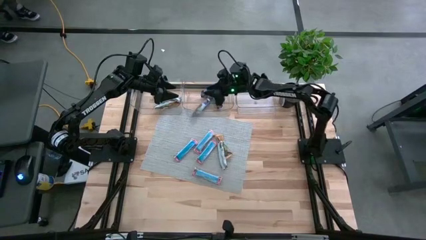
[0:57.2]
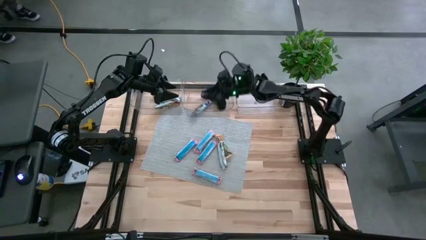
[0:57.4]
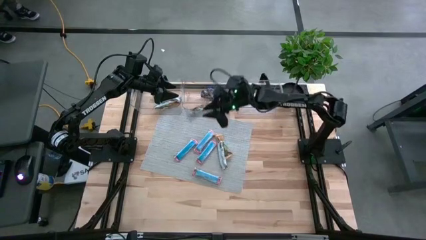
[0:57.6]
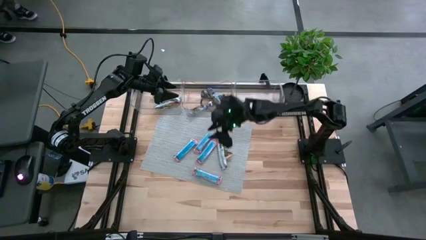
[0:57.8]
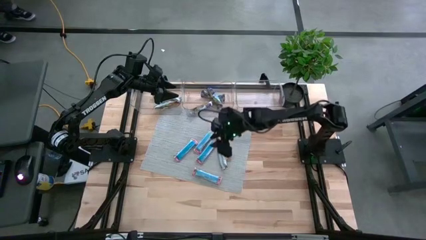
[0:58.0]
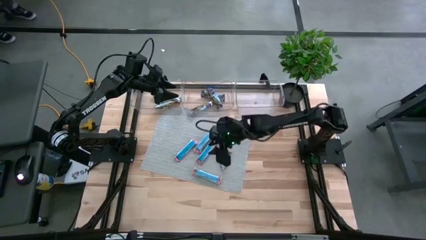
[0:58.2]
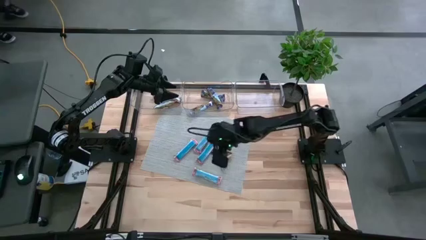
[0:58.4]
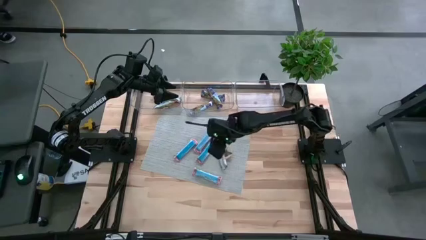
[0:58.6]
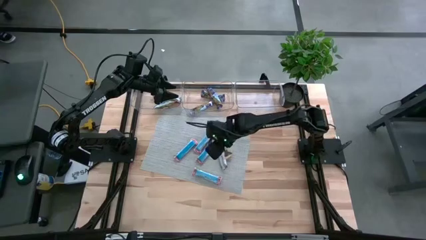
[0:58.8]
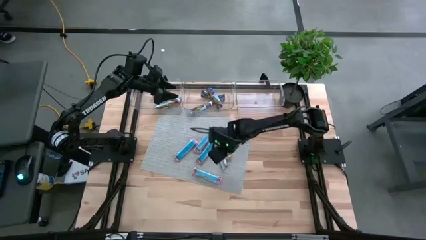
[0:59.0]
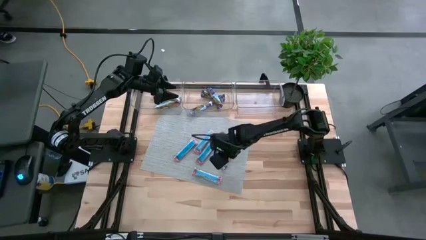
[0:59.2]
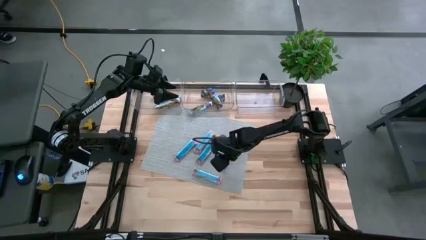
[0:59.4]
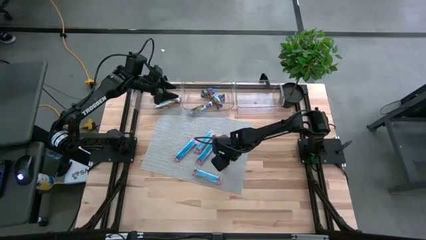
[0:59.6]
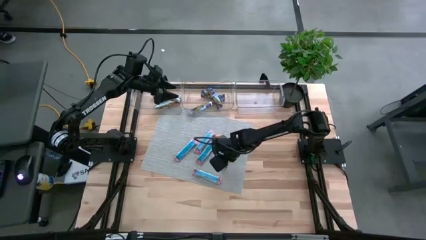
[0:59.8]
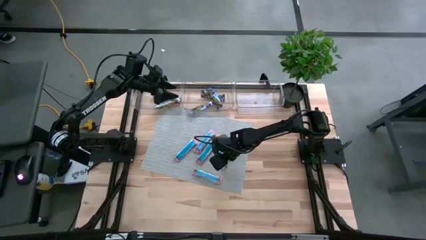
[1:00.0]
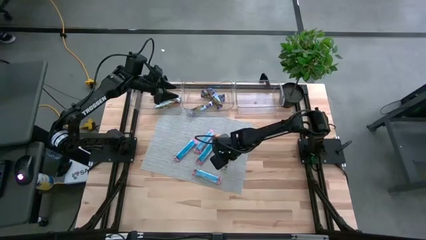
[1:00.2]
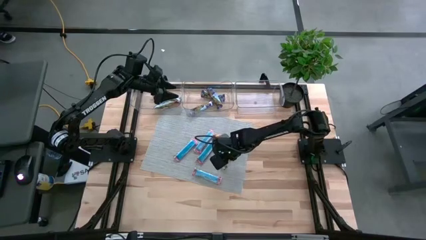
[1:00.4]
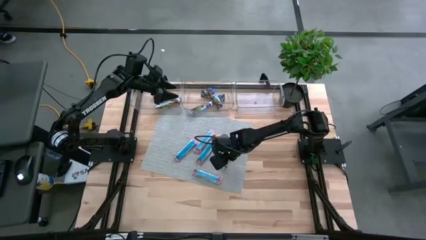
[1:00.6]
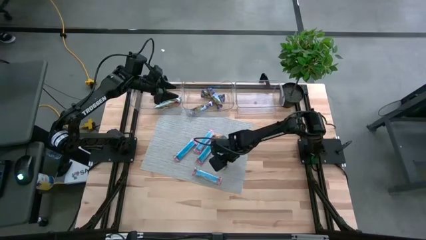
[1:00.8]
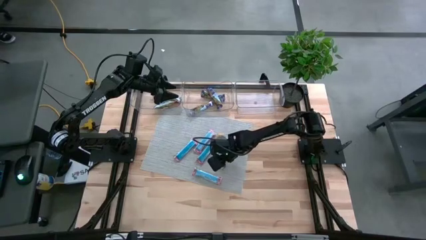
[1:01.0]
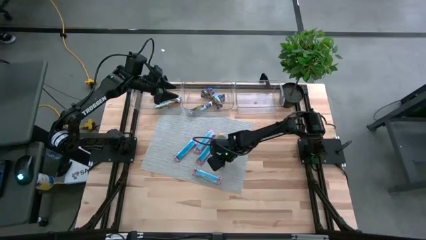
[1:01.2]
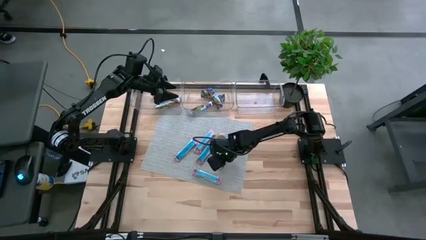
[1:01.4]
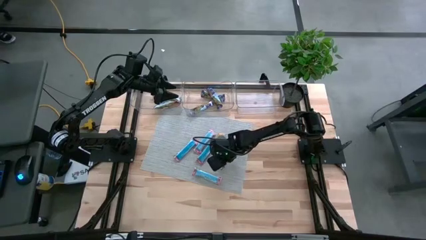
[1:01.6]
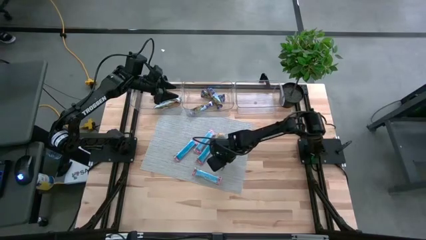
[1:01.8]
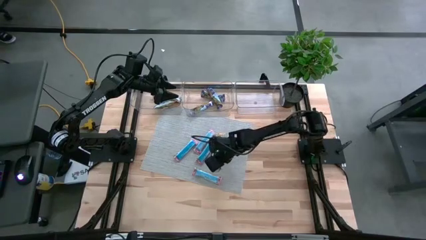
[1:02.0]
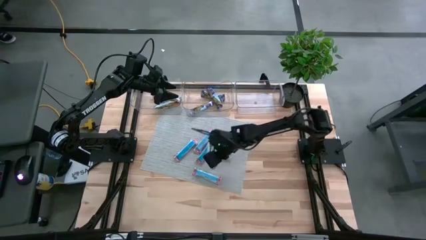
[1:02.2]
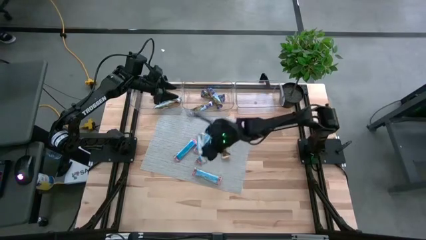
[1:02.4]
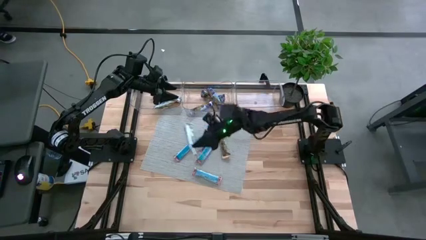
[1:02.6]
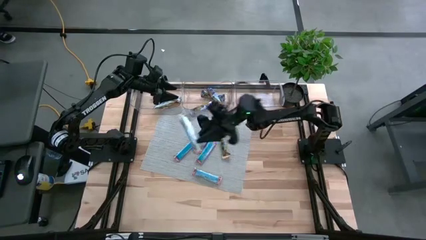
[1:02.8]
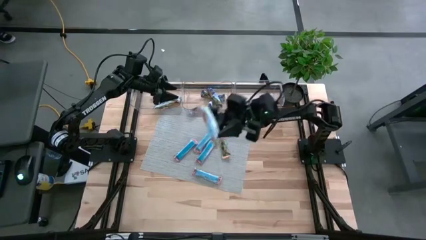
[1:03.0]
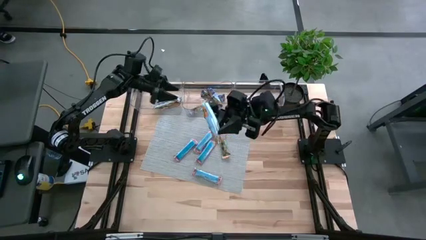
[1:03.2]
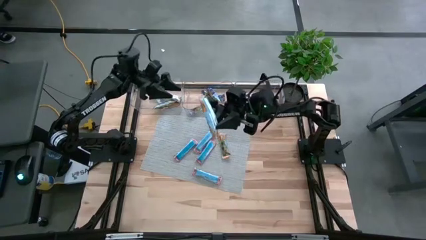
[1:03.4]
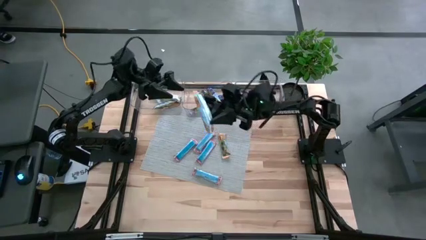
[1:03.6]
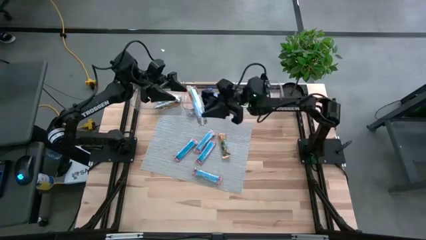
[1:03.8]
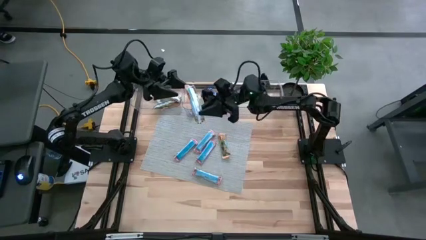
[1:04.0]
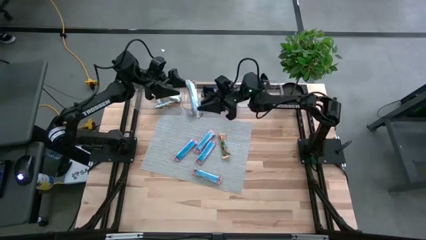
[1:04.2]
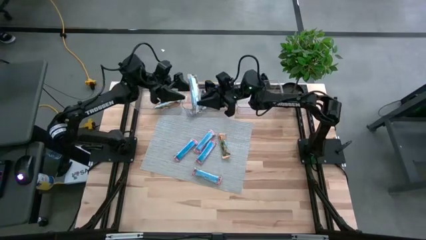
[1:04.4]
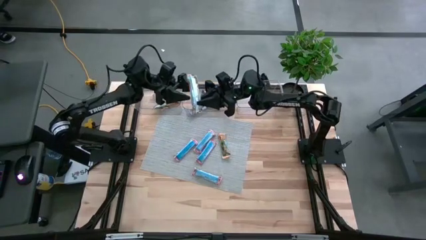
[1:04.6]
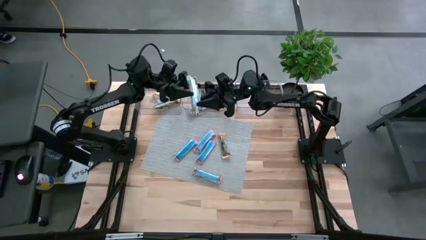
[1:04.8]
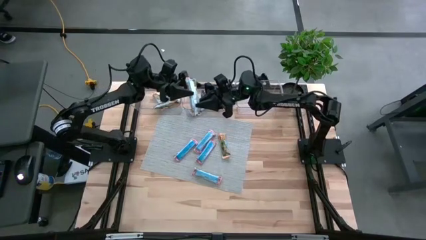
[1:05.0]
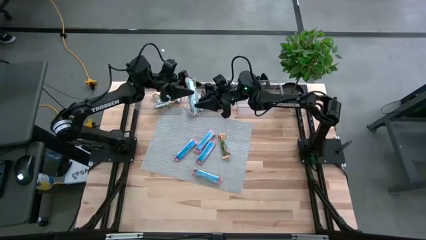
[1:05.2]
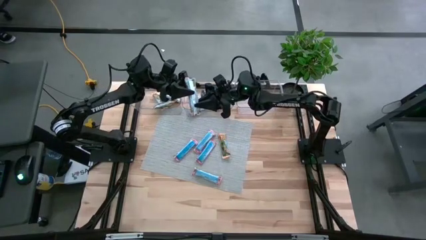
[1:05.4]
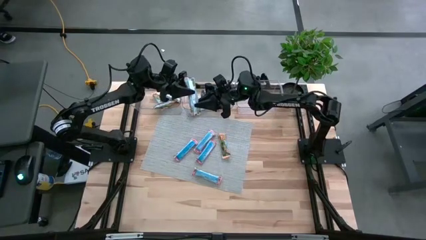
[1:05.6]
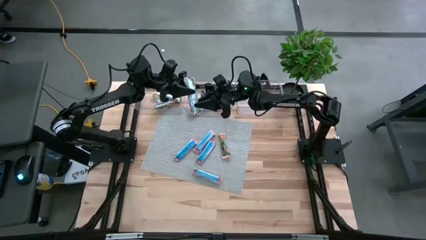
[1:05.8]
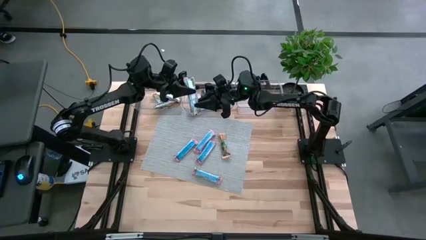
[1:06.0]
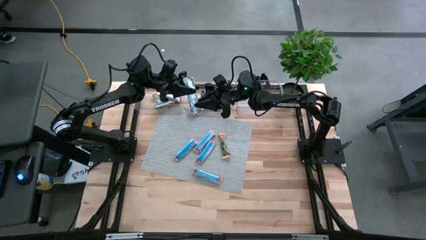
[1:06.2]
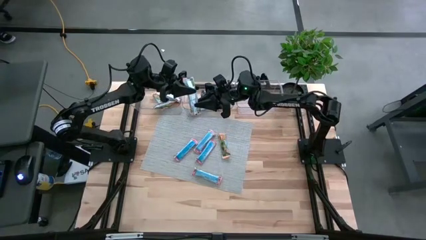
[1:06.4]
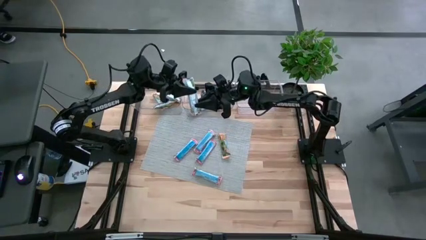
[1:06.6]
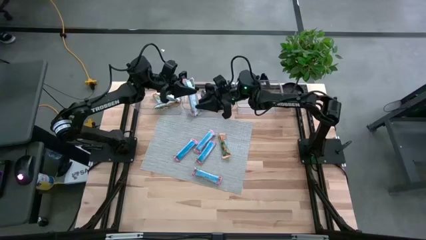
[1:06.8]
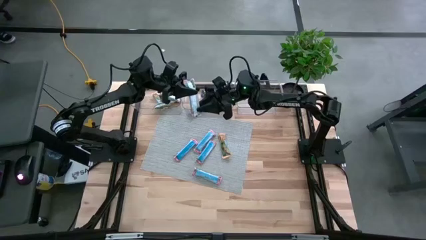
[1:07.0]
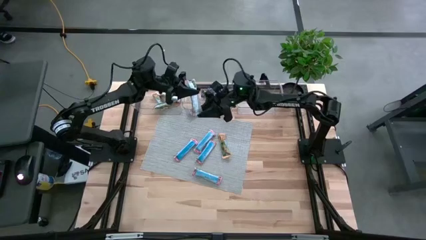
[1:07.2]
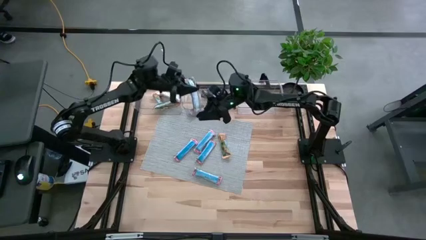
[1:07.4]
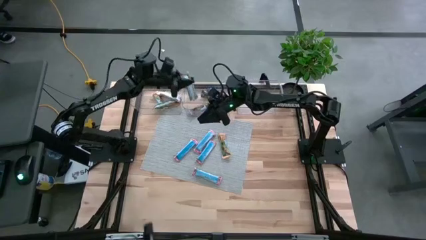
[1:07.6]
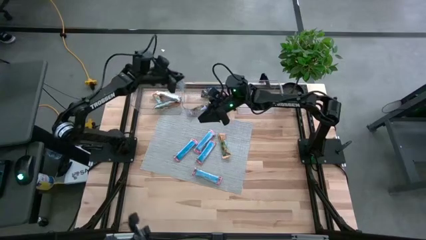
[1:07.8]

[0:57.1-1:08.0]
Task: Pick and place Granola Bars by type
Put the yellow granola bar into the left transparent bin

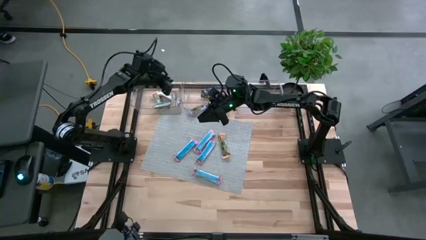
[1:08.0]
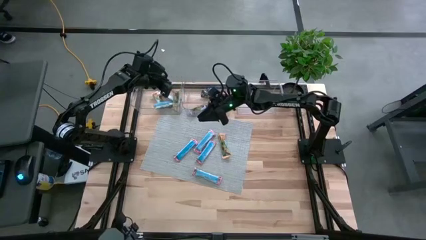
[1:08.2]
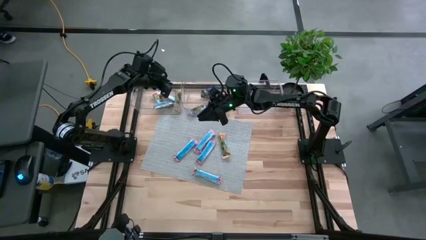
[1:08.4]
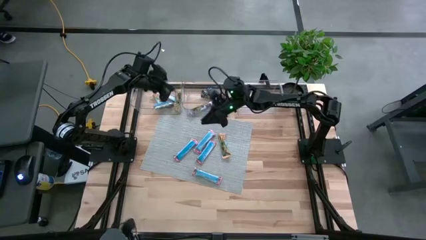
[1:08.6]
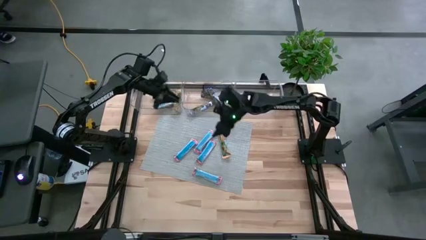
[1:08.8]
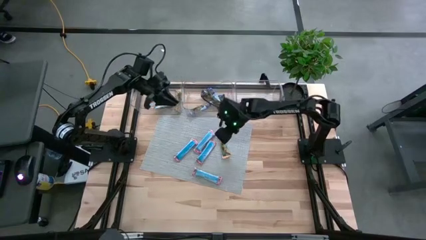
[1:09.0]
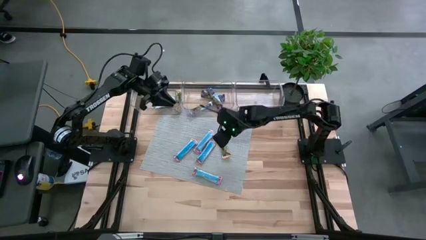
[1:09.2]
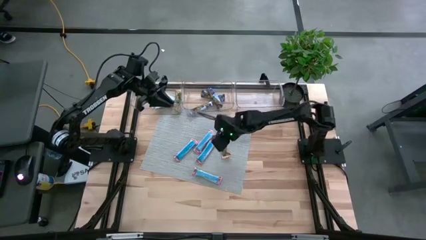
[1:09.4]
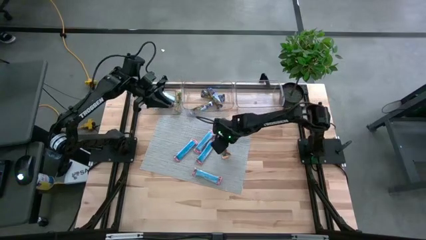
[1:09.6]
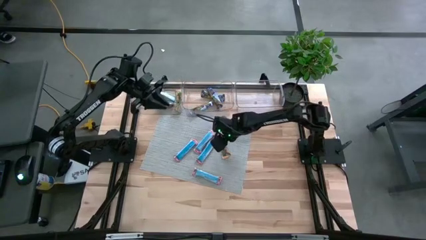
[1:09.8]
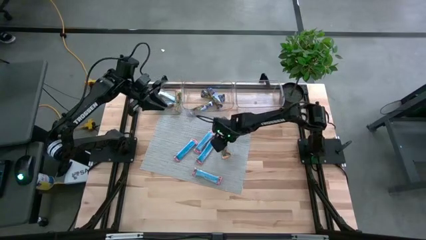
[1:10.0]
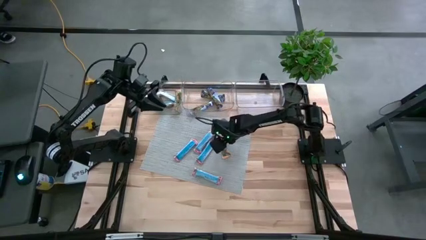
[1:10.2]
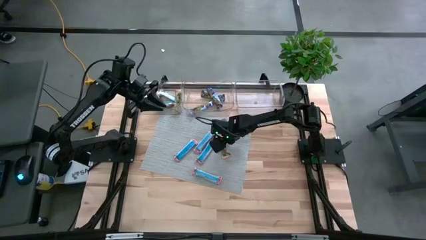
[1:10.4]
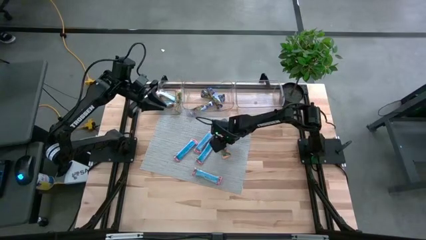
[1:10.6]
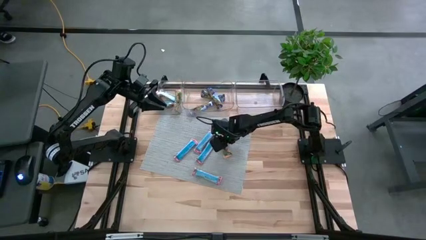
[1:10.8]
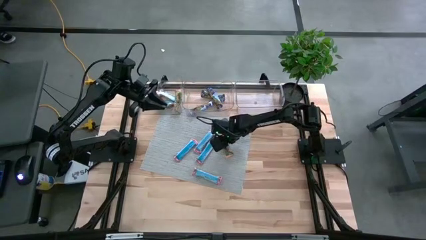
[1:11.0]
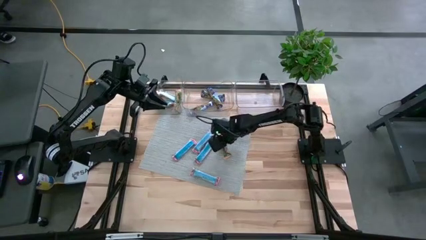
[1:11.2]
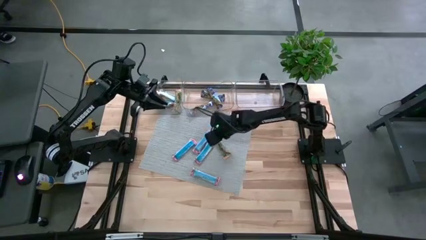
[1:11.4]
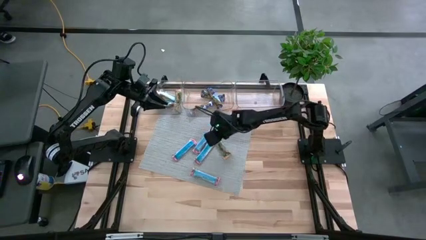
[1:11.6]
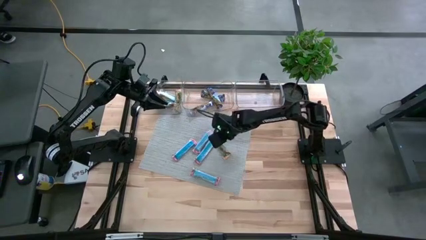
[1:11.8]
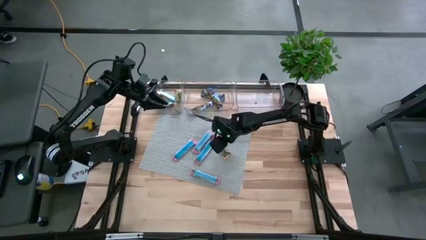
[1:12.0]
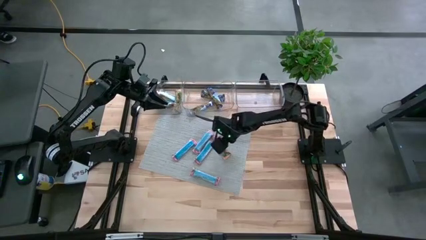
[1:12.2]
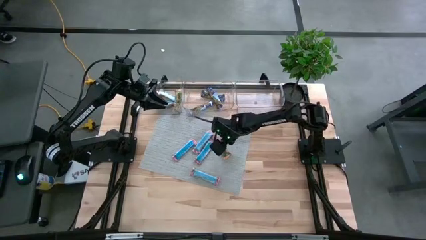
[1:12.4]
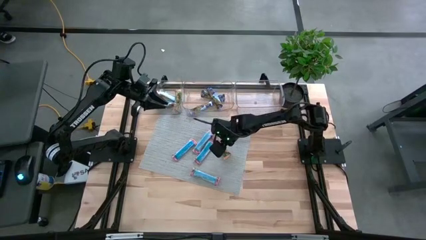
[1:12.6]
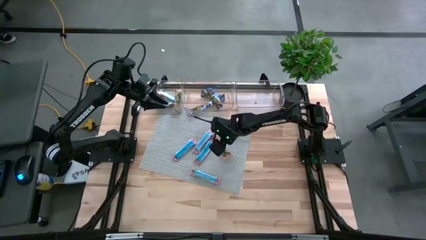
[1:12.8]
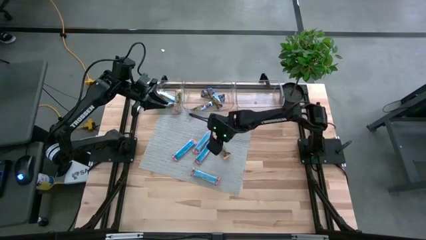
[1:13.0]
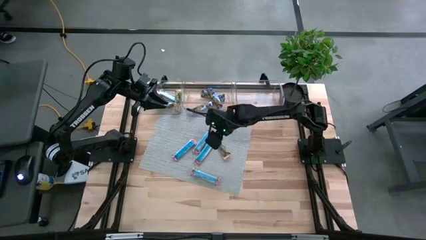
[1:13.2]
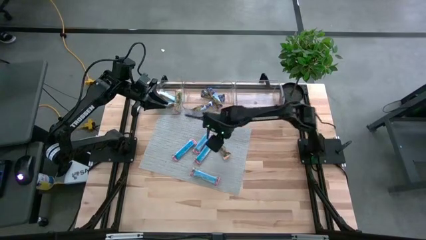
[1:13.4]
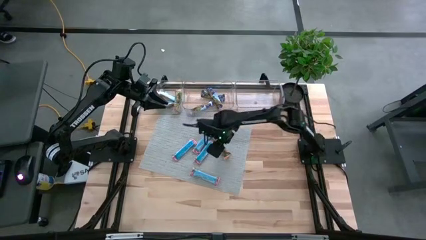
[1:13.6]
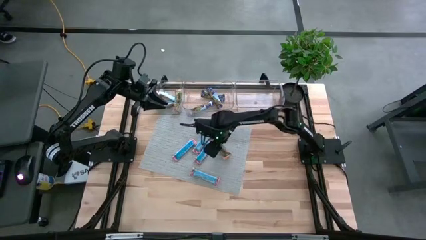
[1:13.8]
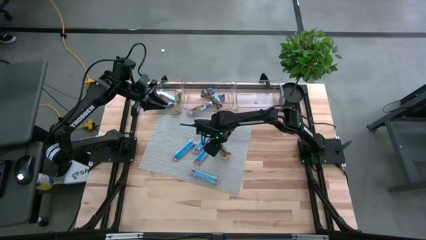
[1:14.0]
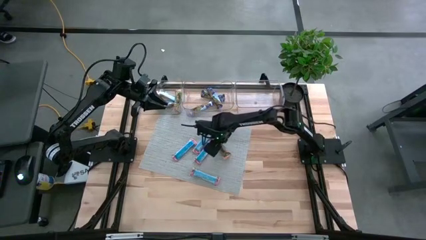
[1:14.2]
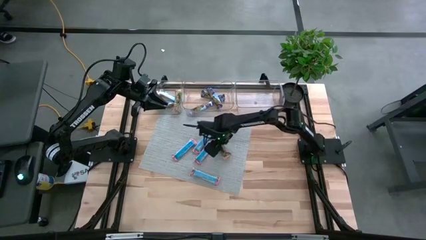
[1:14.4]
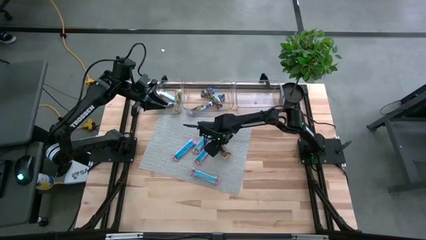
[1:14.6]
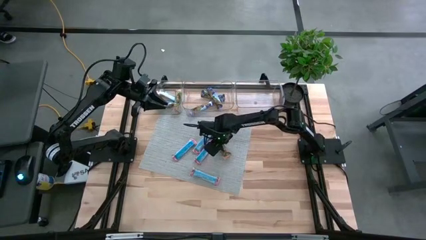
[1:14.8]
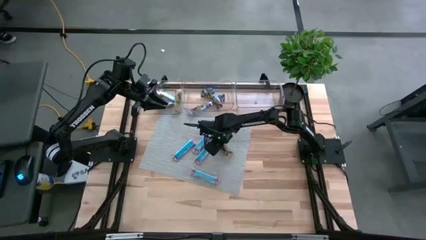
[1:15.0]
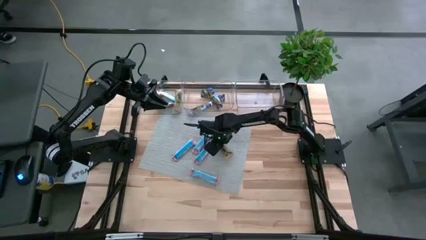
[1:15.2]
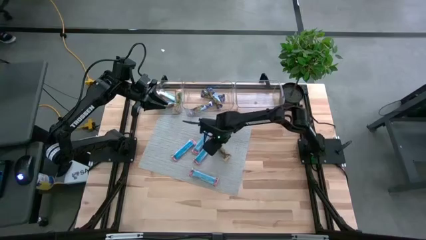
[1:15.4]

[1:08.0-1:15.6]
Put the yellow granola bar into the left transparent bin
